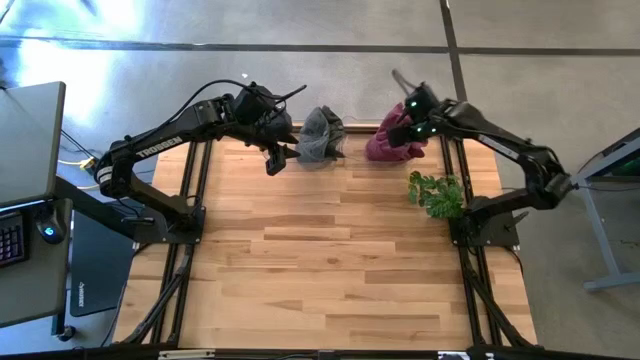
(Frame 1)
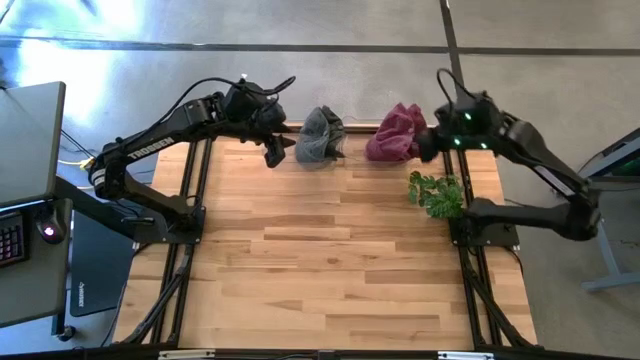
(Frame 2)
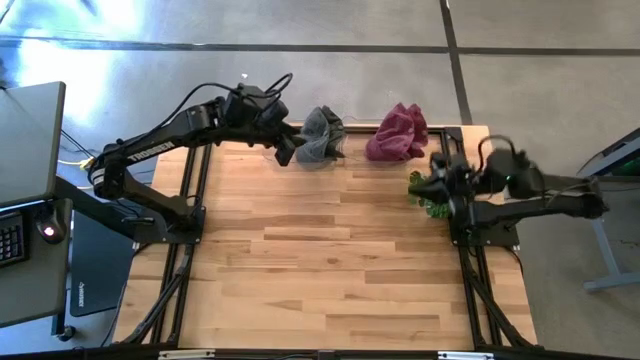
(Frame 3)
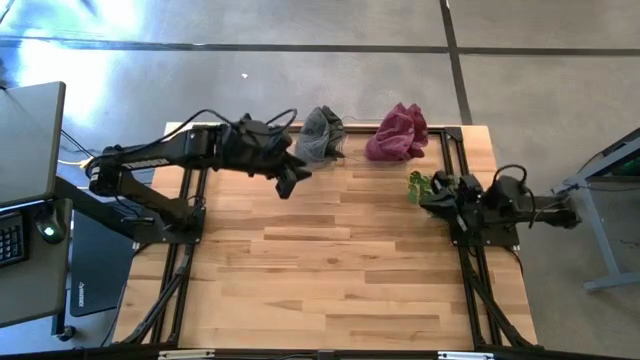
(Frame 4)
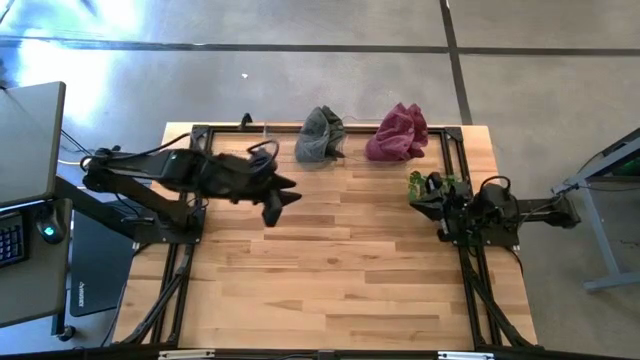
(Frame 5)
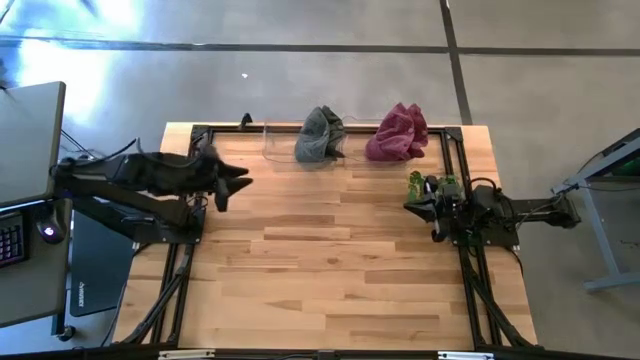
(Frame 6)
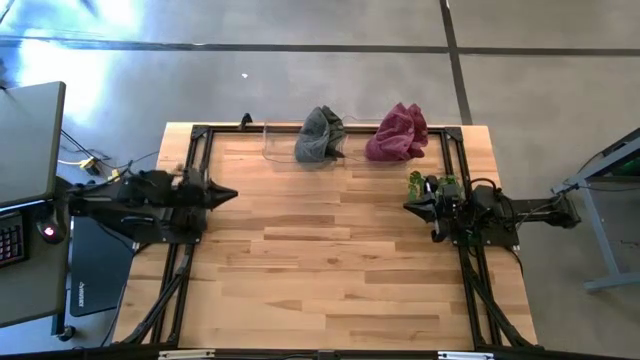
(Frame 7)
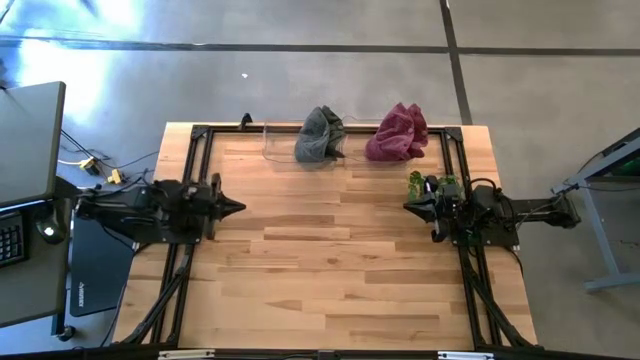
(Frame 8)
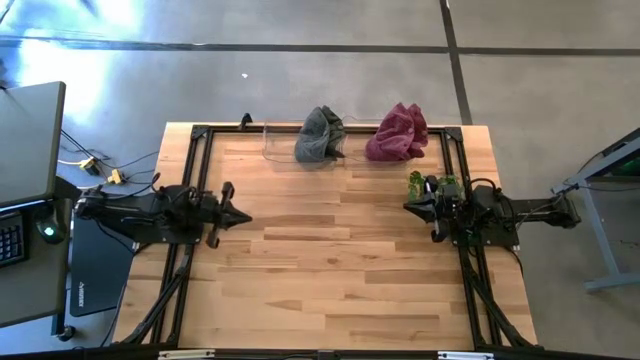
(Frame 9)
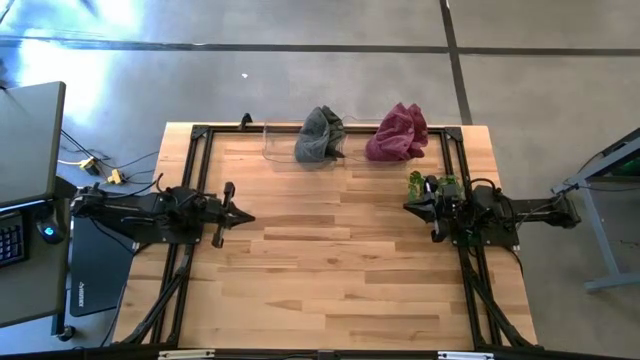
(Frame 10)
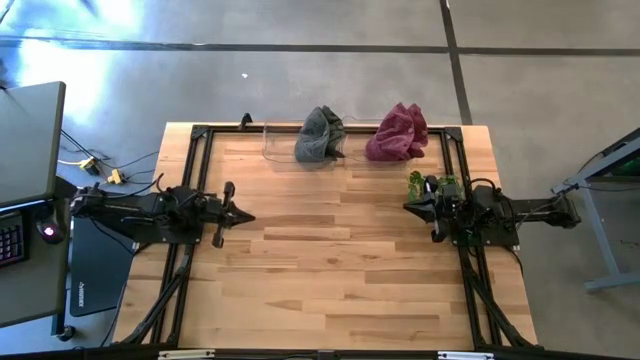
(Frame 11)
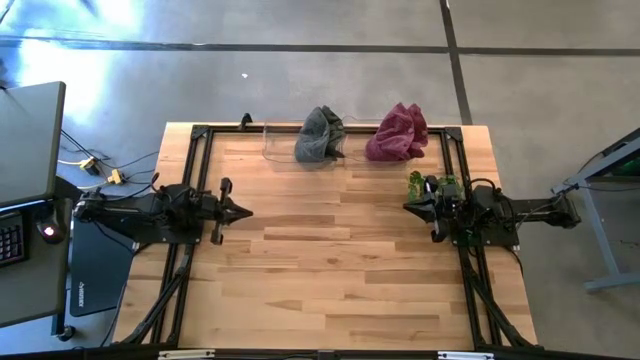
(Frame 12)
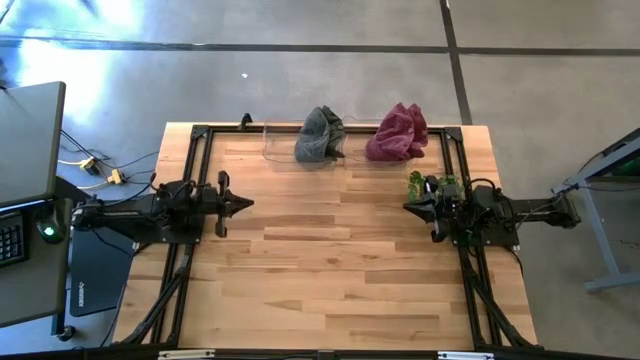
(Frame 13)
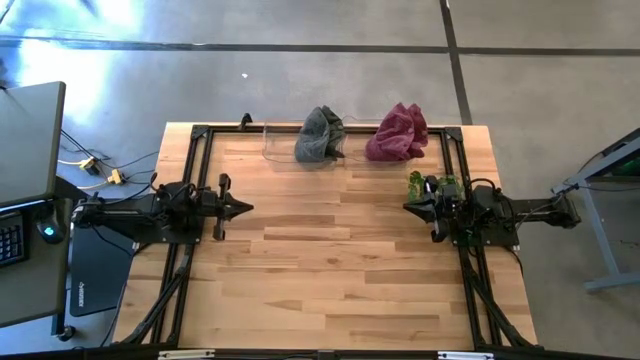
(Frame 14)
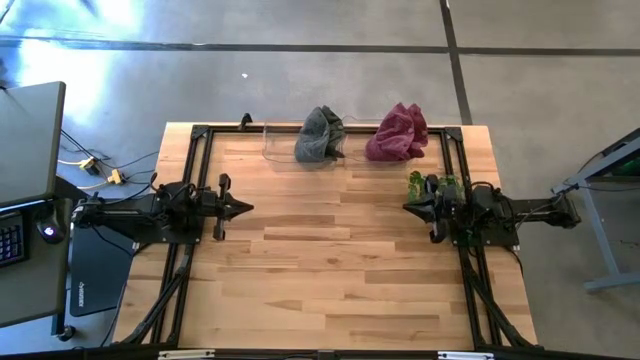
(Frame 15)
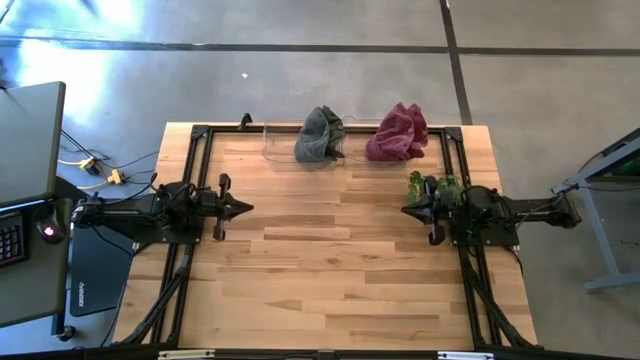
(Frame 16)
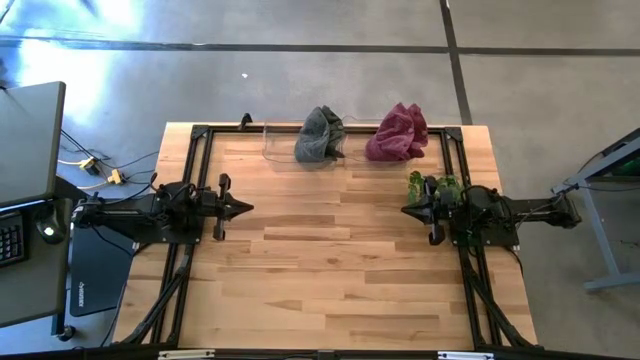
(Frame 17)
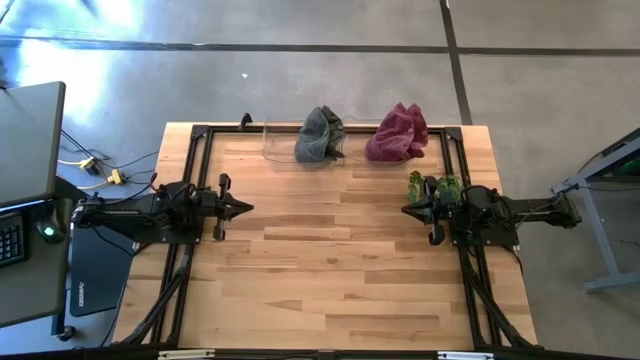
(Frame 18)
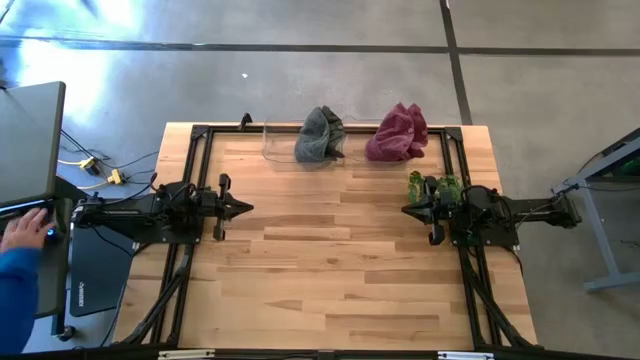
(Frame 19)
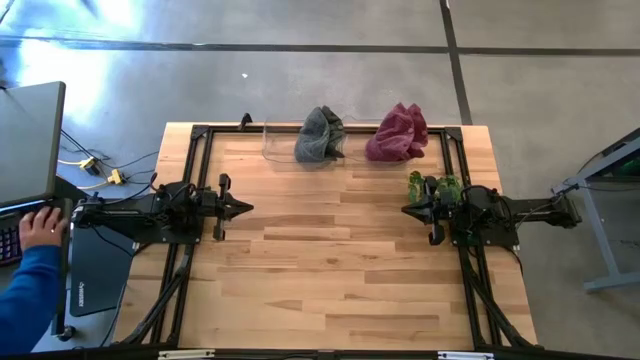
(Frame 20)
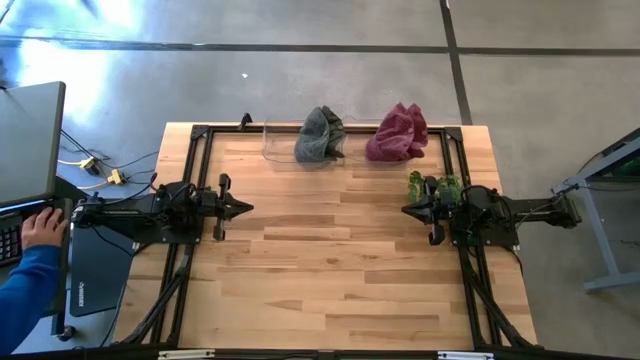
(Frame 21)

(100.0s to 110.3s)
Task: Pick & Place hat
Return to Home Position

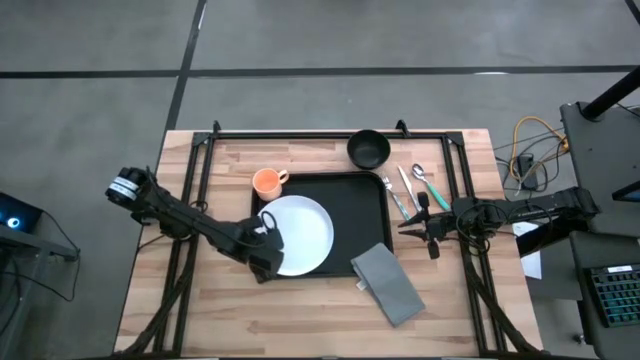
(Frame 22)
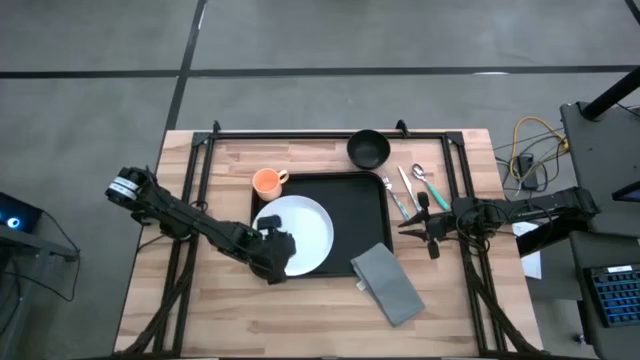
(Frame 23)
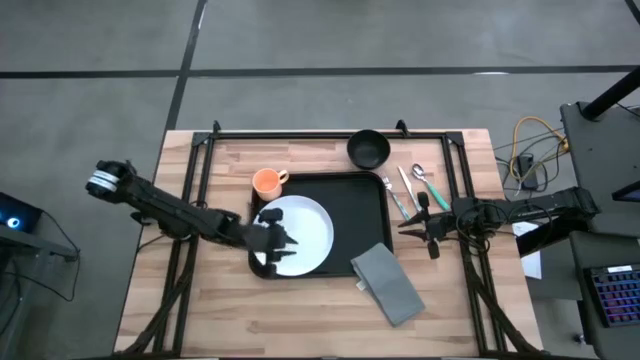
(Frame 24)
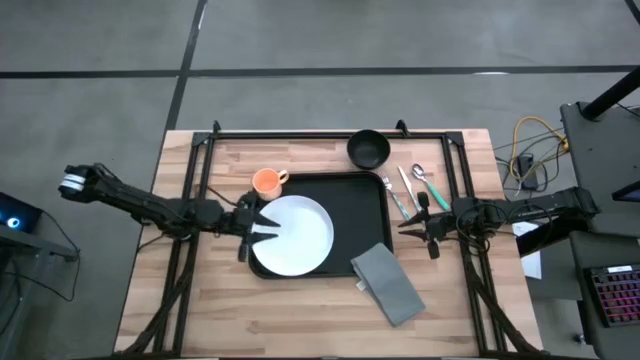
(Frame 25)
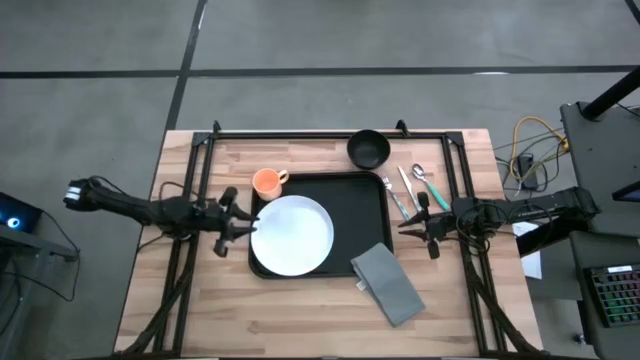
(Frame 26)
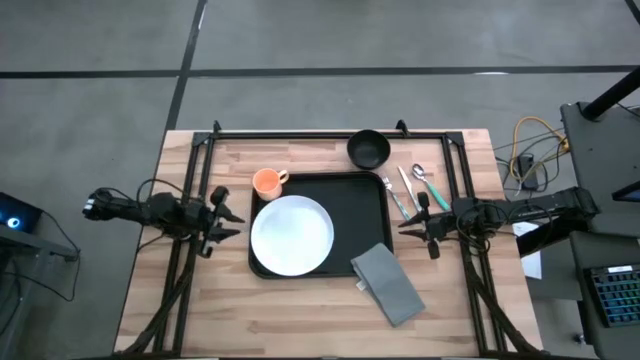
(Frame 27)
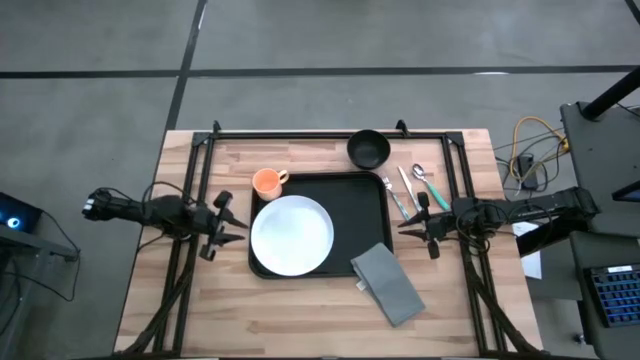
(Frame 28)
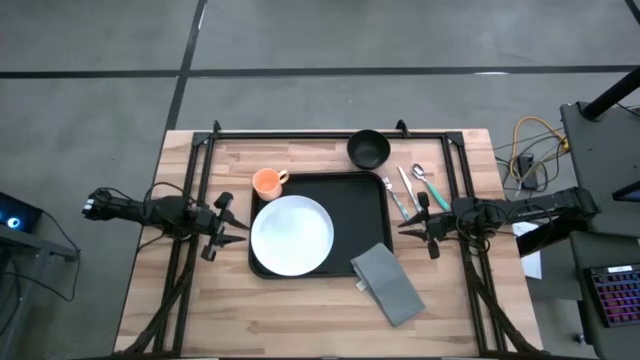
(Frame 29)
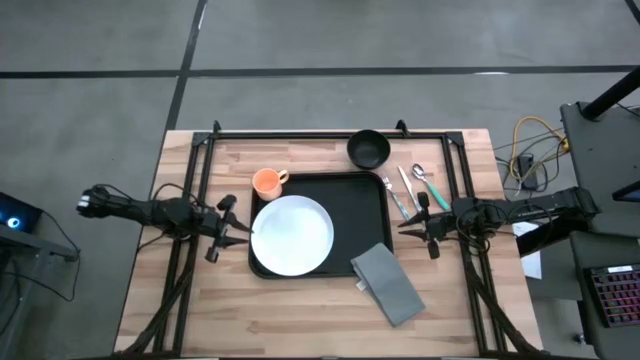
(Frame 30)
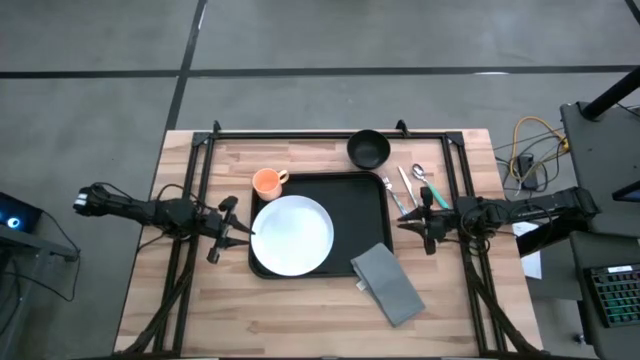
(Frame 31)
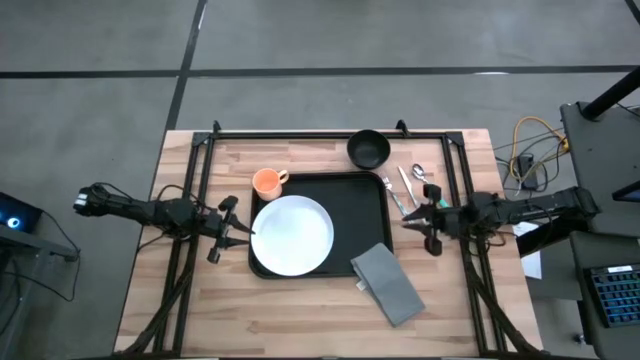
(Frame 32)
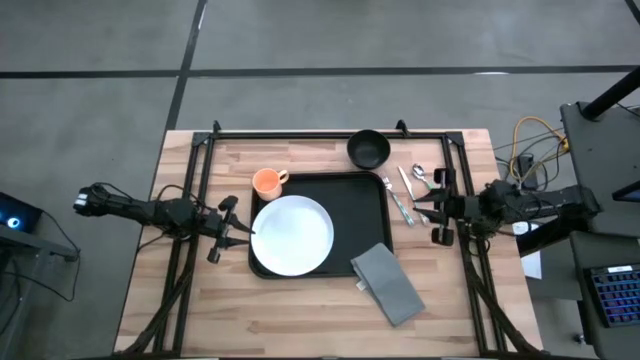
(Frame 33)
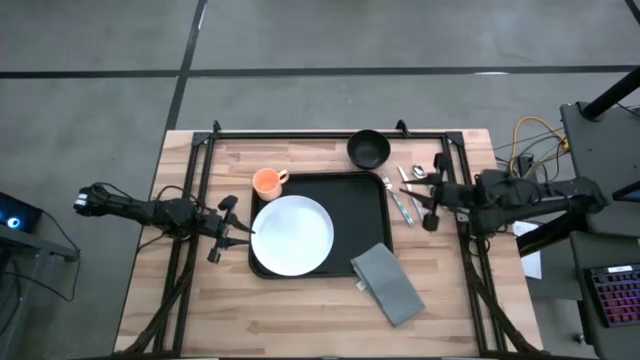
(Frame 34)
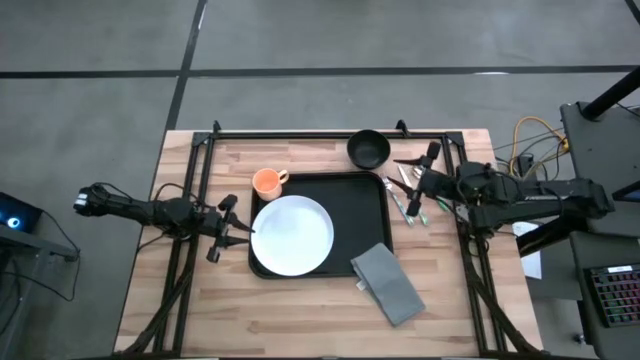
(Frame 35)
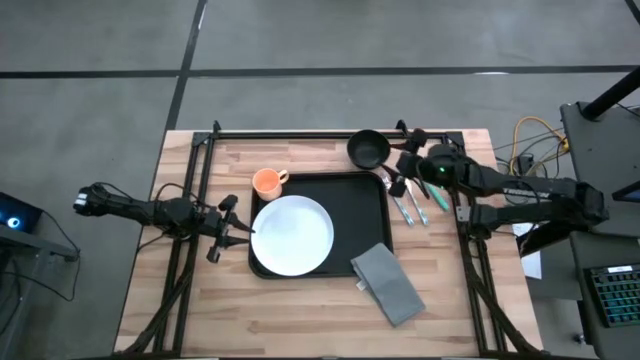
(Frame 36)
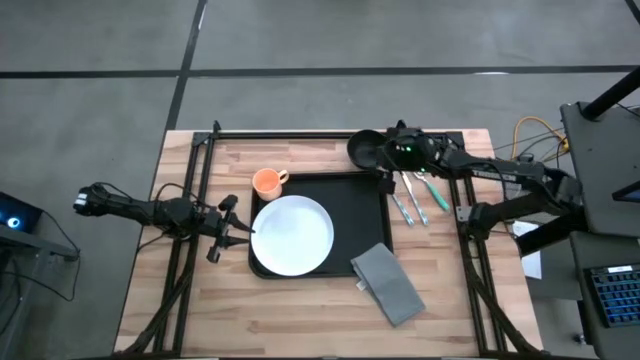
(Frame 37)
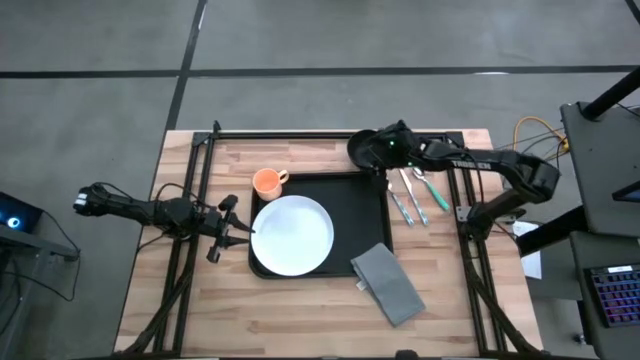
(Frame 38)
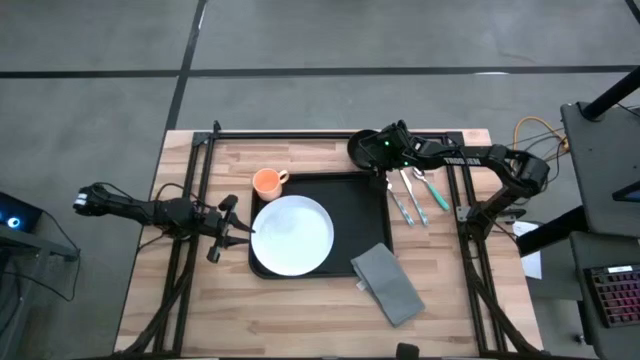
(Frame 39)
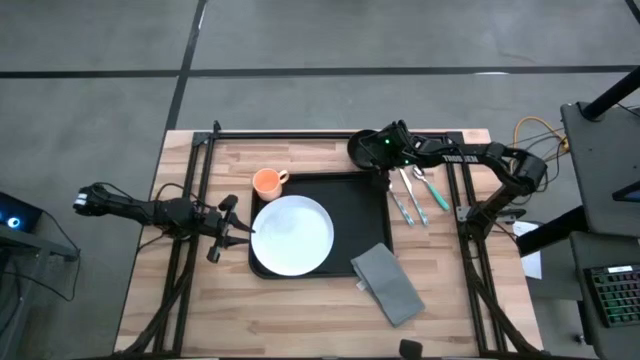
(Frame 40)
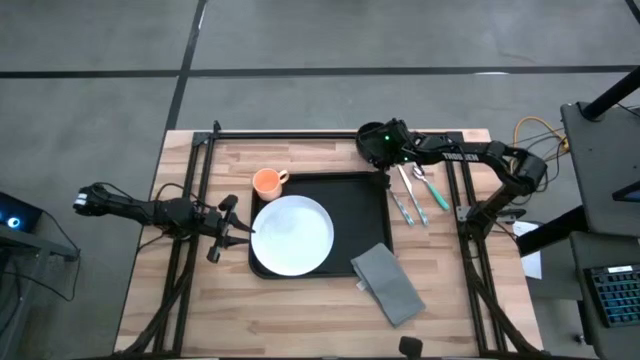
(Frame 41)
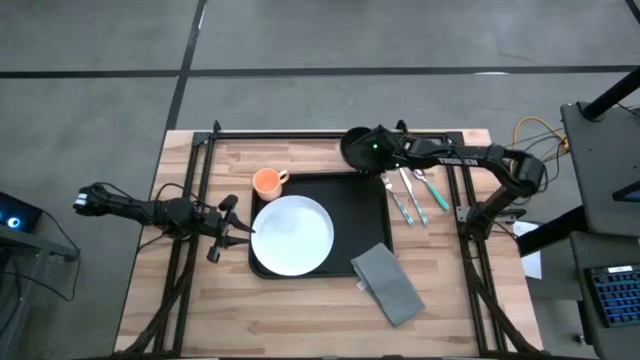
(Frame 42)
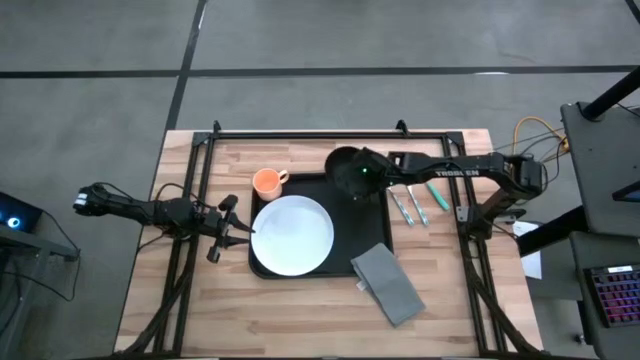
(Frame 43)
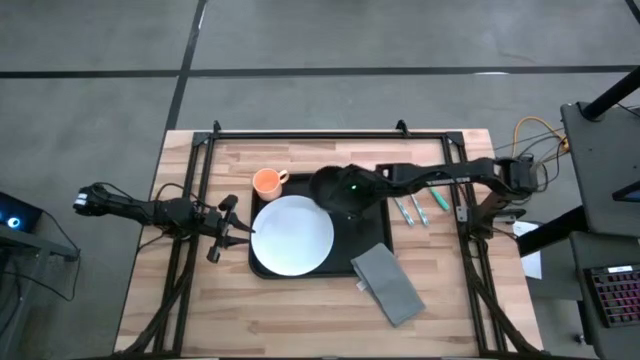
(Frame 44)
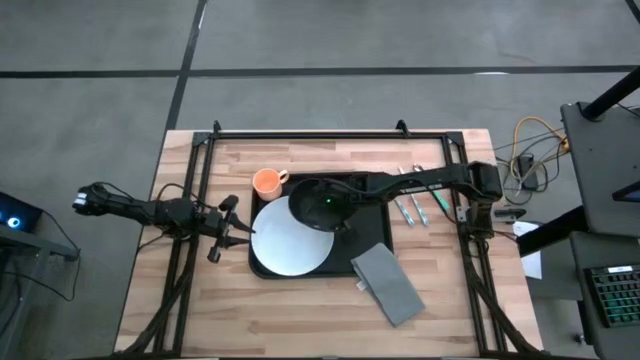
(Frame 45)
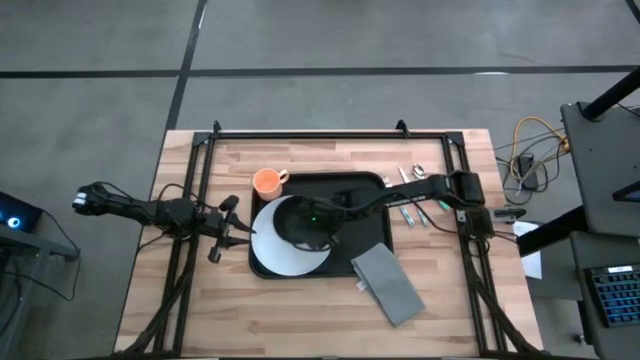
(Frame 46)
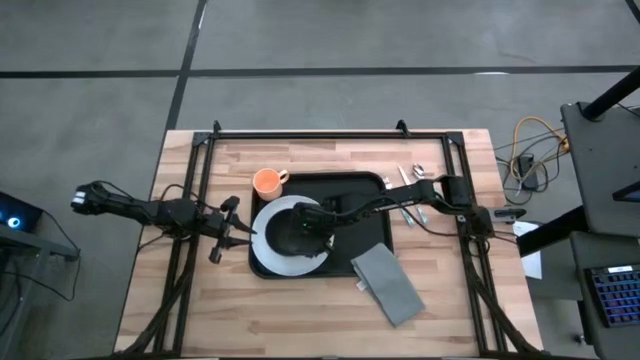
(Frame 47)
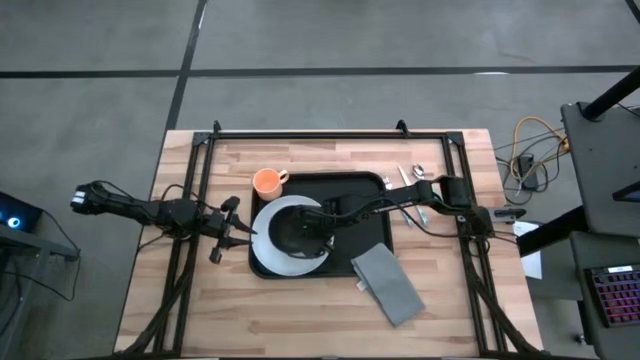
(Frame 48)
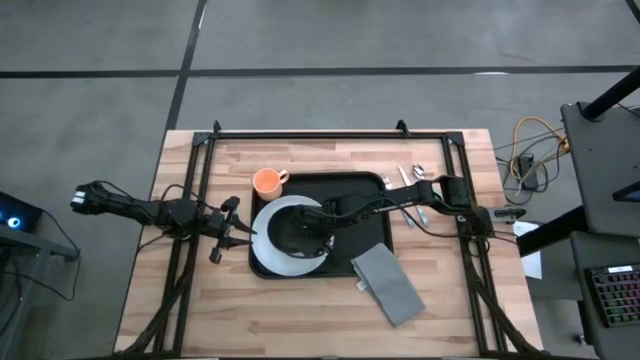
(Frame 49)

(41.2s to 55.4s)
Task: Set up tray
Put the black bowl on the white plate on the black serving tray
